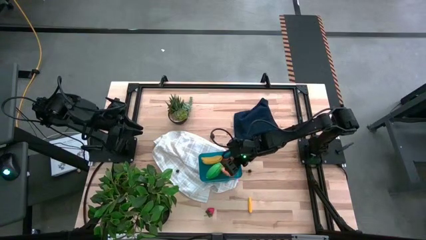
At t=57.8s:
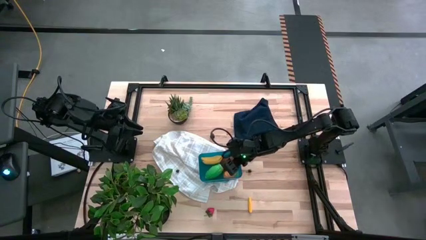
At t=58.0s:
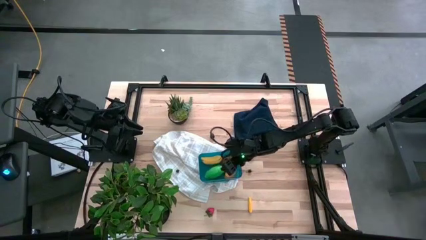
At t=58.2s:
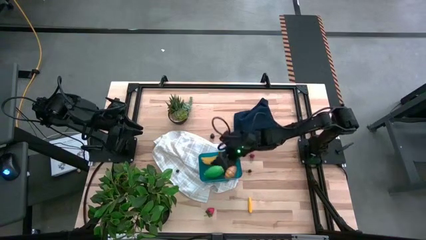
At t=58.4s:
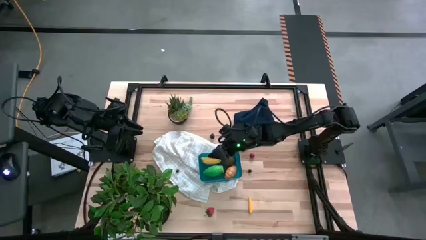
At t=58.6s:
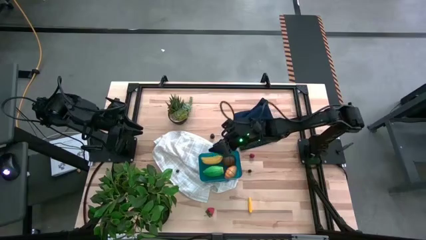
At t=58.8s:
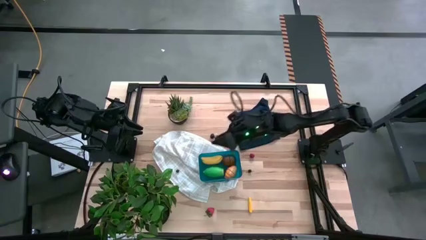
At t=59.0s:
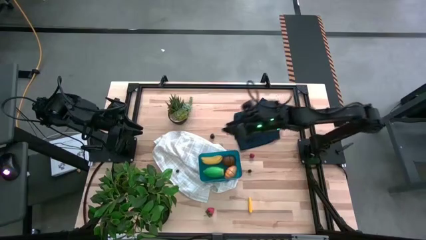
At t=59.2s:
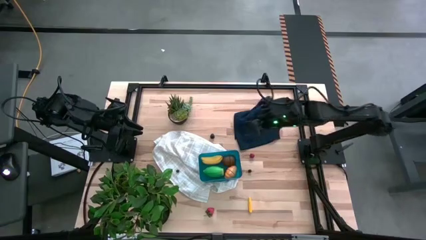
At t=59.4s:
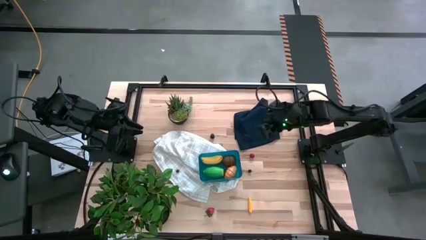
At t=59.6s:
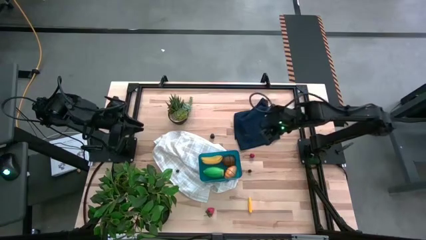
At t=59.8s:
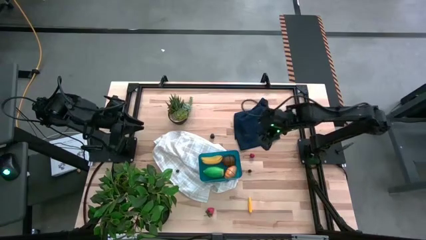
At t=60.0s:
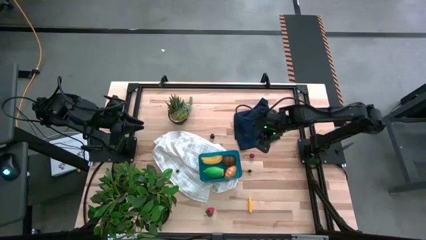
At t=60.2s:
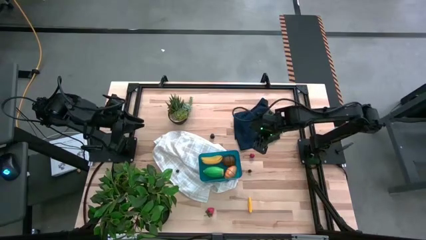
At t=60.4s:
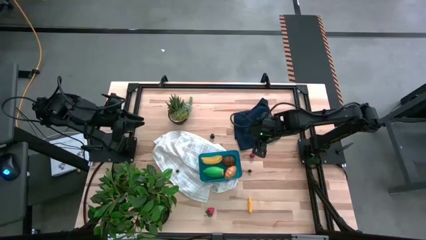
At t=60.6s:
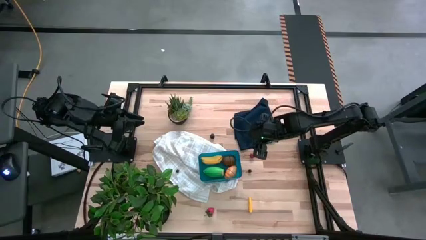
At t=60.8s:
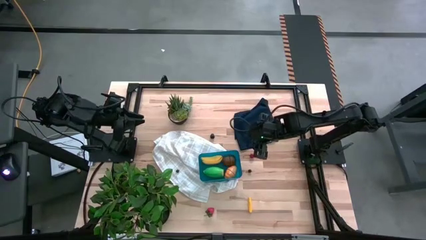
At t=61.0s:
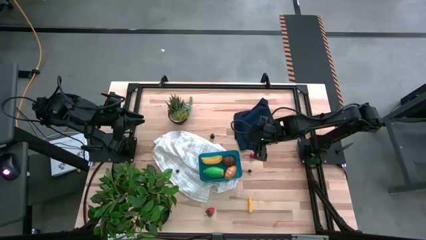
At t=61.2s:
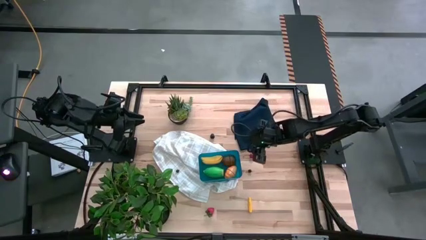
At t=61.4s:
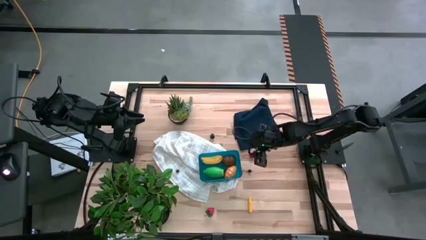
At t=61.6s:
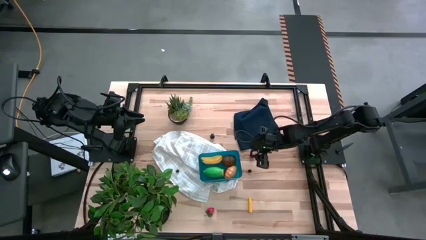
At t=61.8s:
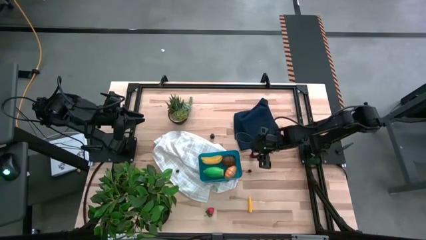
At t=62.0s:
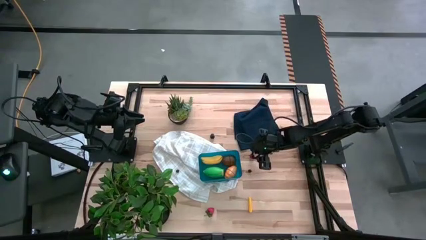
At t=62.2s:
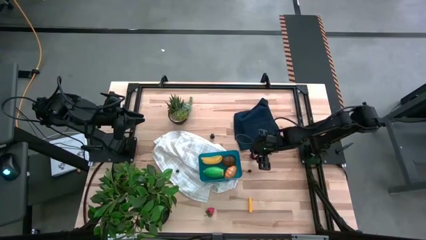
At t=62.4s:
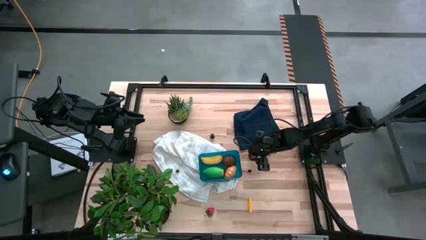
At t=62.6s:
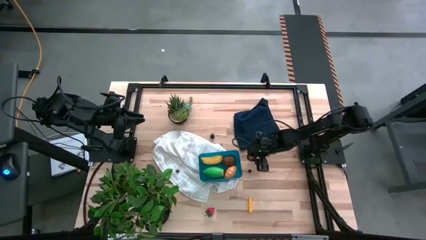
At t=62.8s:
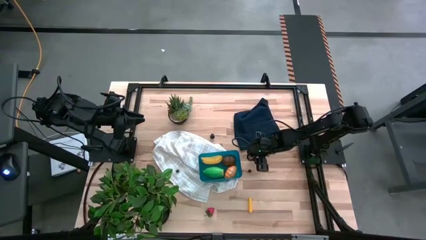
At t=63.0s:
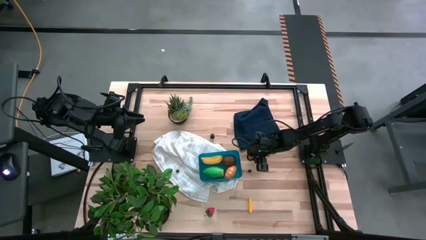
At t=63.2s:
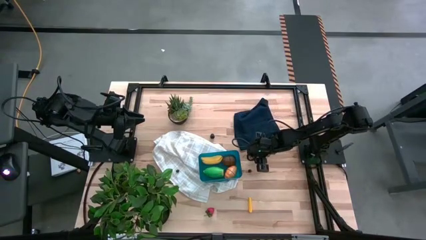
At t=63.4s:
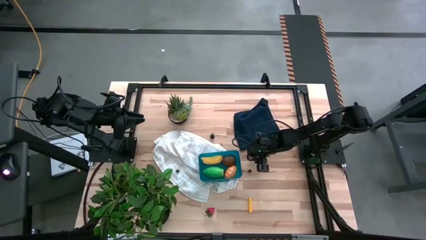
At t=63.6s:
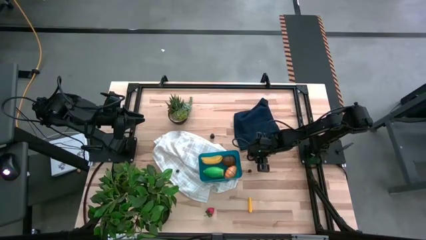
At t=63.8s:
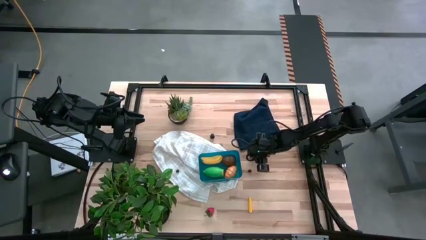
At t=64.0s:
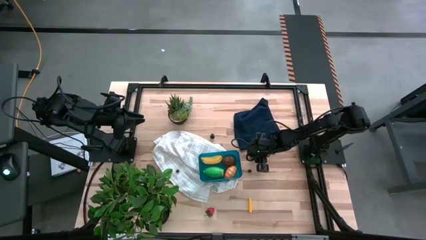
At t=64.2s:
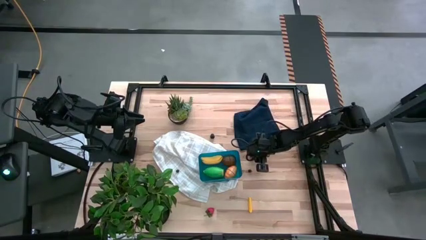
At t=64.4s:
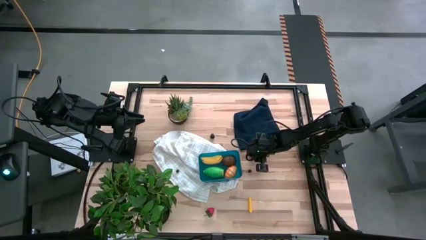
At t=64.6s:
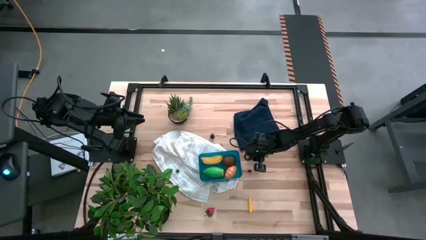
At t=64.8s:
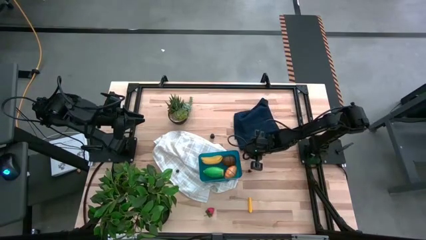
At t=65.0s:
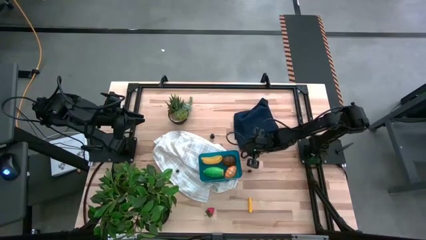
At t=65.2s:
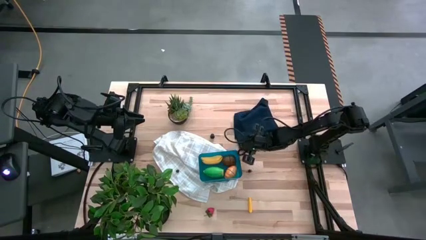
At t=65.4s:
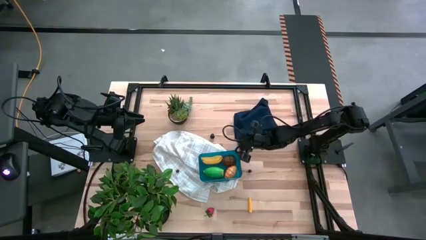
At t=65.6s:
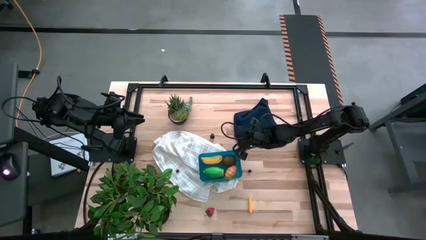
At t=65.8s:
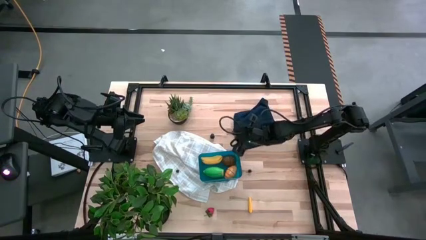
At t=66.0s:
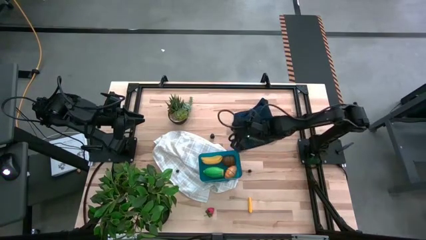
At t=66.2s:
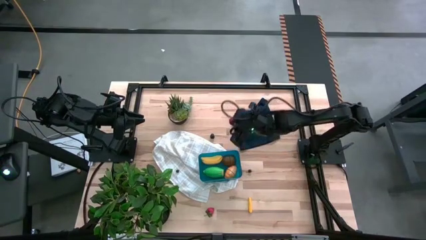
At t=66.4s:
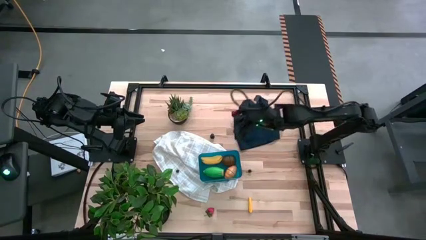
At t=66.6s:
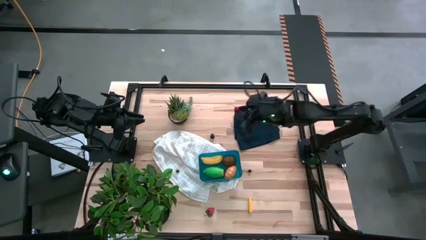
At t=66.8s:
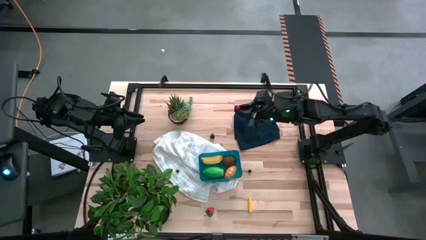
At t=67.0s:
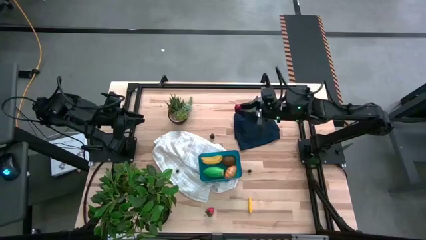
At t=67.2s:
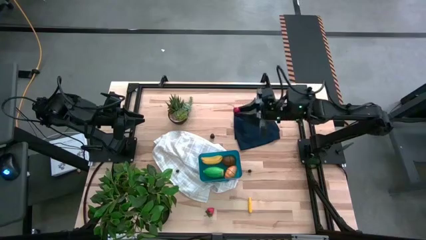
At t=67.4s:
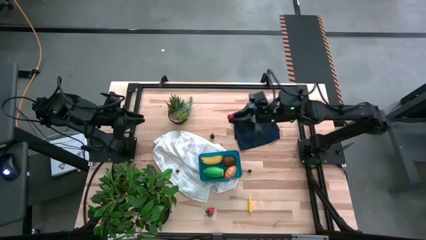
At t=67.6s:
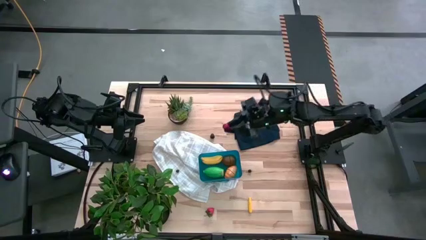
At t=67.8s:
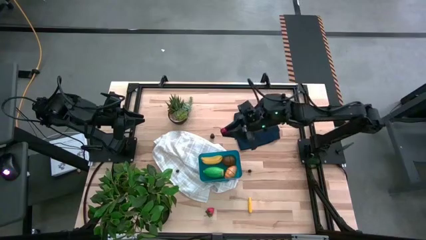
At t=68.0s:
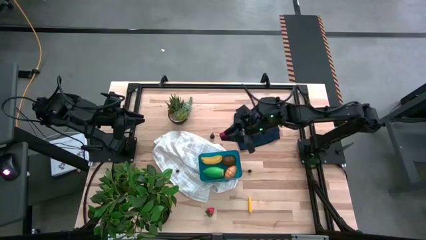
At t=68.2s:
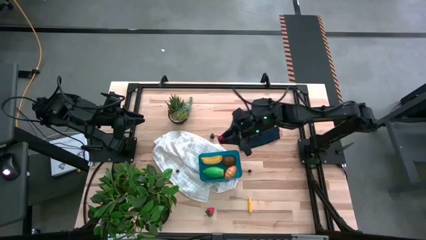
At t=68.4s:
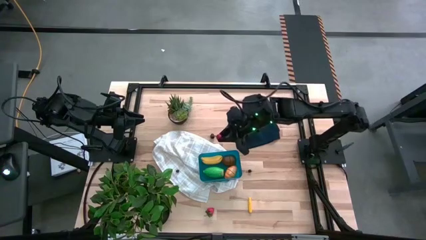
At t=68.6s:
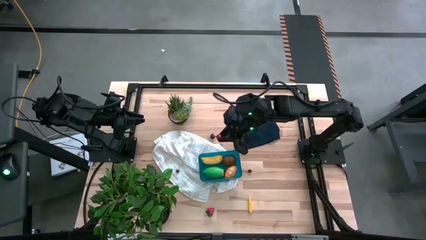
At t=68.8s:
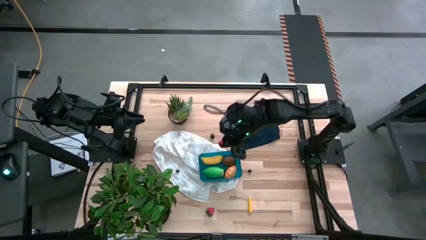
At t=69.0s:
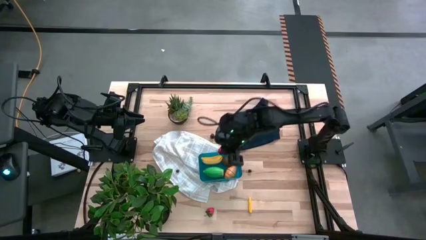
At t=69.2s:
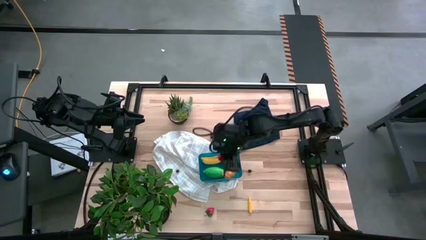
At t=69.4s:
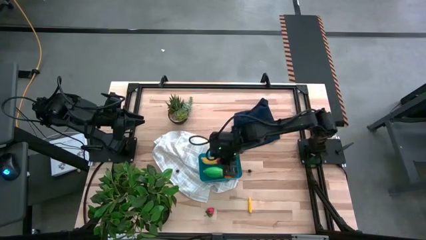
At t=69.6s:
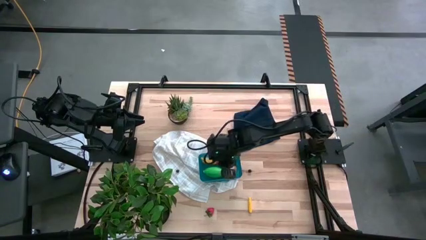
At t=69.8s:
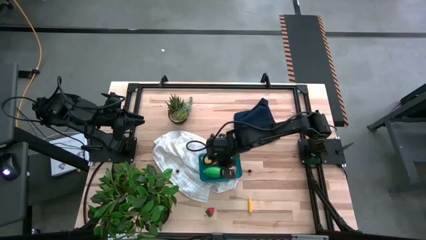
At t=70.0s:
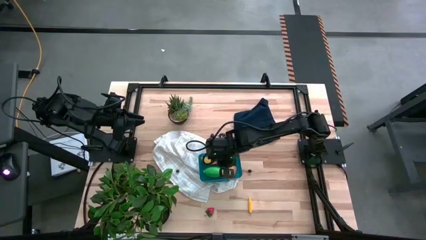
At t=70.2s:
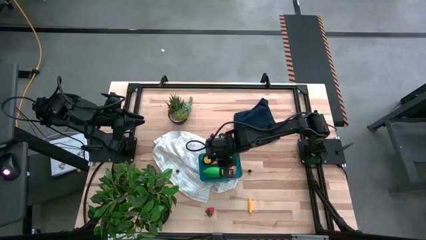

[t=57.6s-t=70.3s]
Task: Pick and placing Produce into tupperware
Put the red cherry into the blue bin

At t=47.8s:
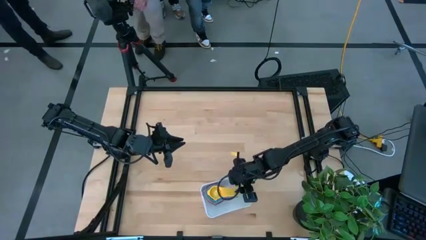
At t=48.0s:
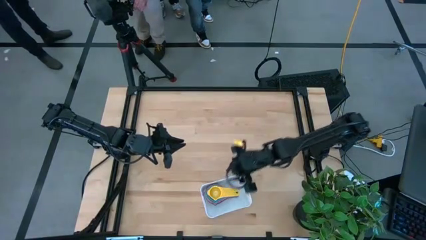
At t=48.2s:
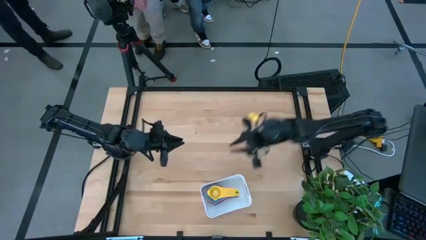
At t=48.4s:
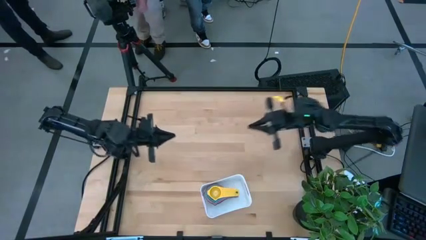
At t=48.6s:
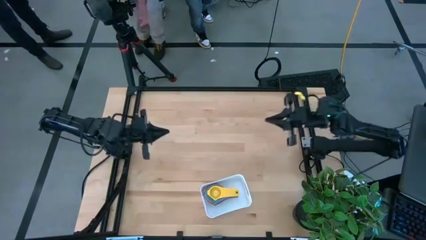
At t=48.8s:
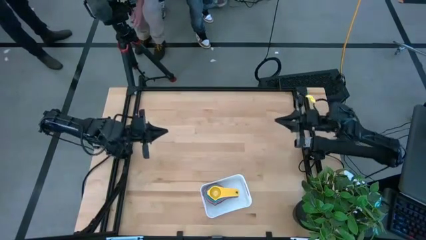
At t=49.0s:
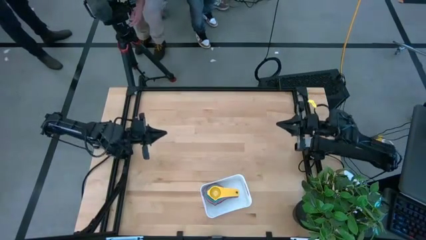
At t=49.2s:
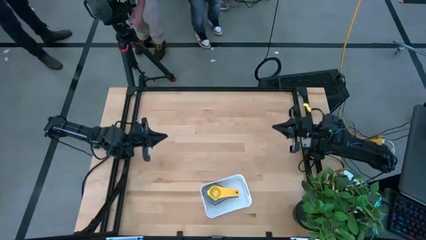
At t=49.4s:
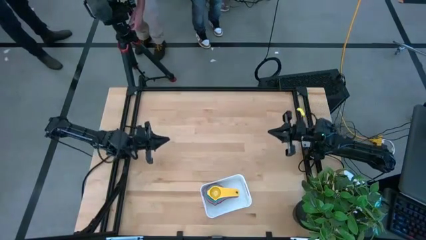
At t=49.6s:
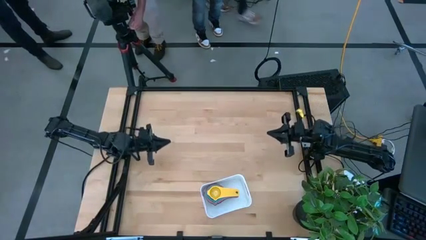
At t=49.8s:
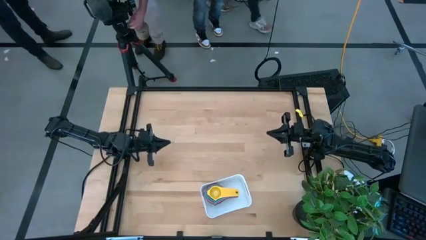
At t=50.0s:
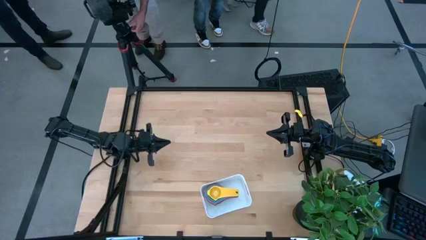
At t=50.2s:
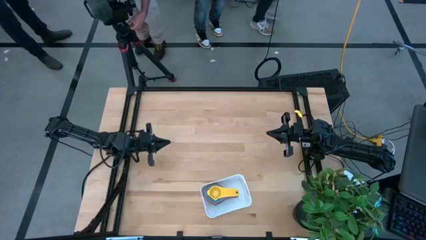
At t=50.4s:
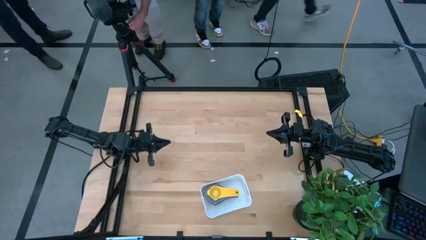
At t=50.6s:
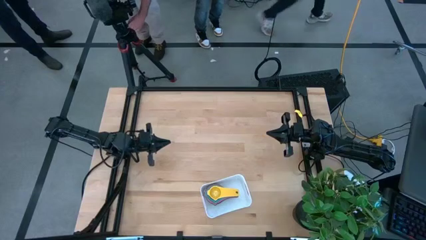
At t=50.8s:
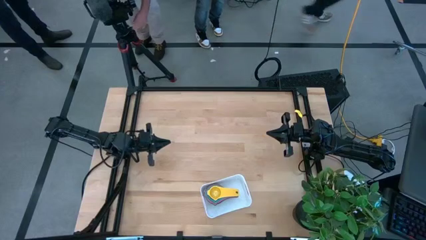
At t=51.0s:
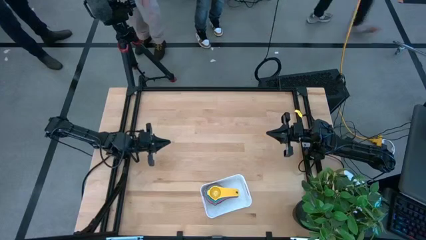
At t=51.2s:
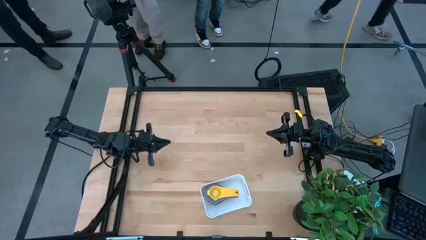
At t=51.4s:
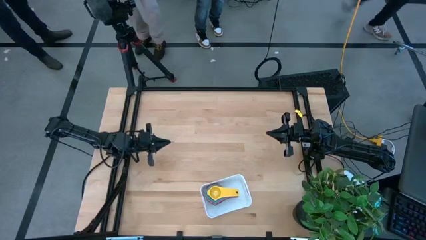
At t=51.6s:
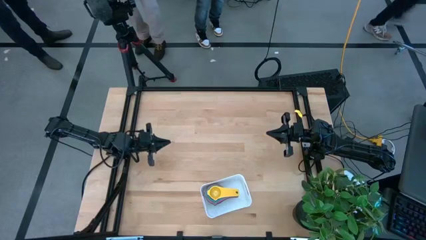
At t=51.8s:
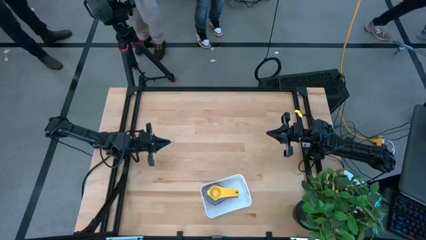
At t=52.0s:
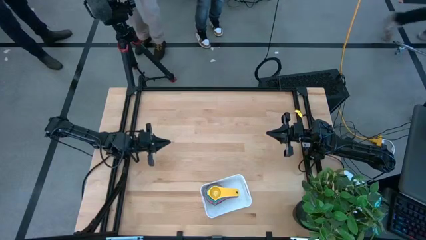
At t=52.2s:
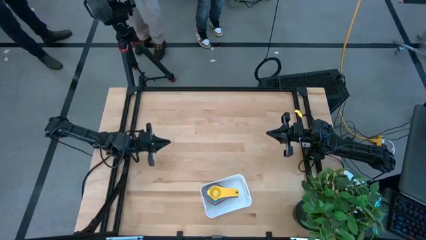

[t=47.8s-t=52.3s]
Task: Nest measuring cups in basket
Return to Home Position
